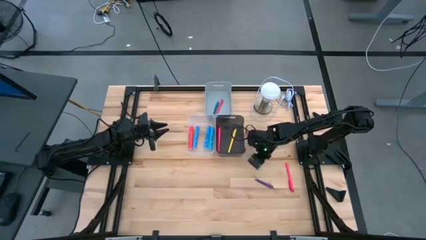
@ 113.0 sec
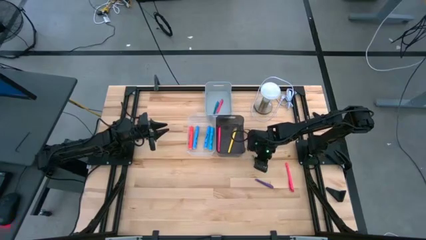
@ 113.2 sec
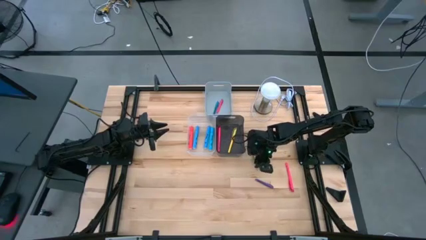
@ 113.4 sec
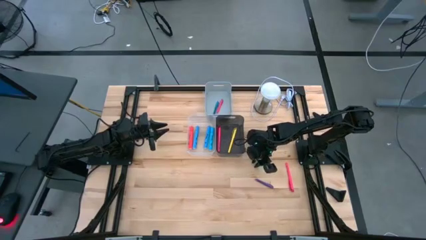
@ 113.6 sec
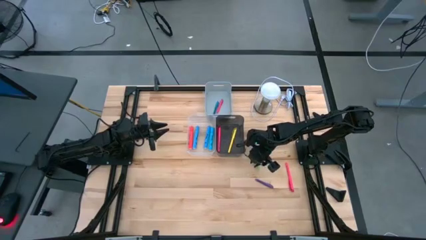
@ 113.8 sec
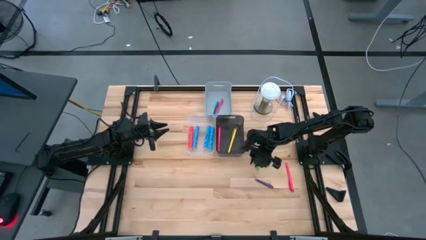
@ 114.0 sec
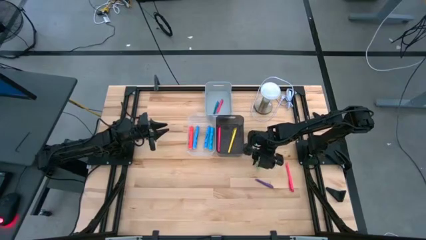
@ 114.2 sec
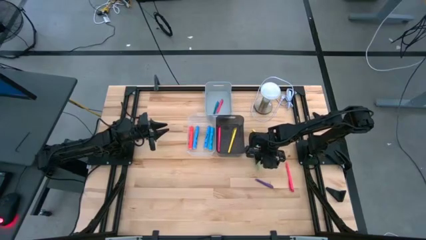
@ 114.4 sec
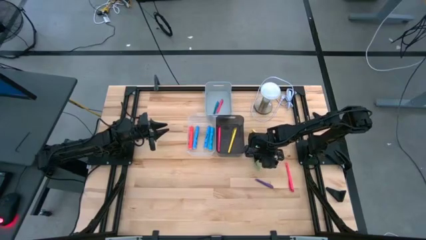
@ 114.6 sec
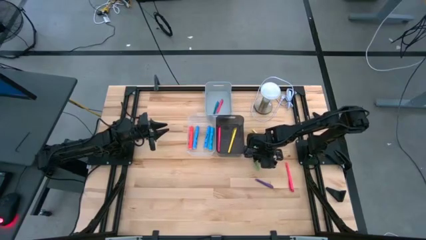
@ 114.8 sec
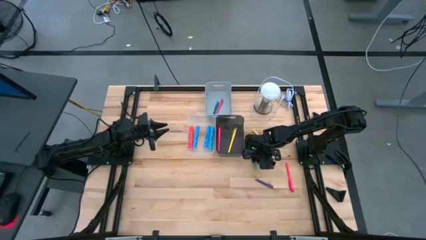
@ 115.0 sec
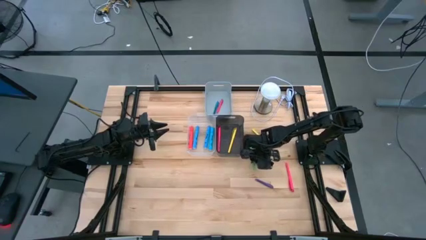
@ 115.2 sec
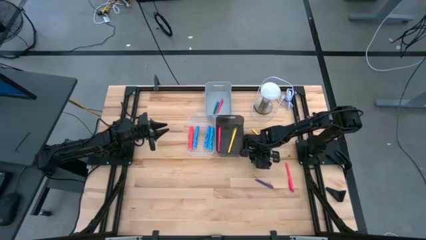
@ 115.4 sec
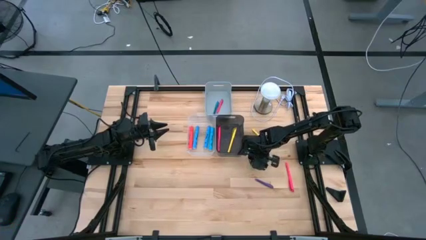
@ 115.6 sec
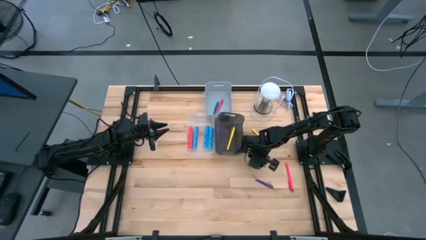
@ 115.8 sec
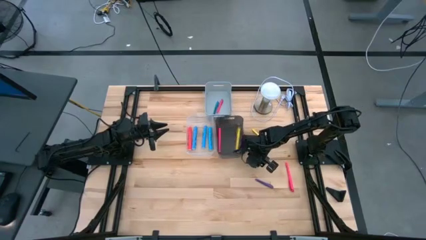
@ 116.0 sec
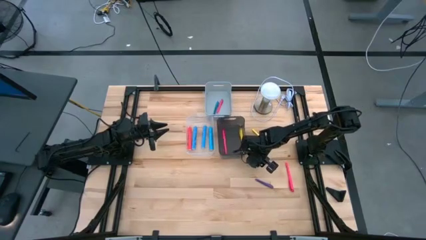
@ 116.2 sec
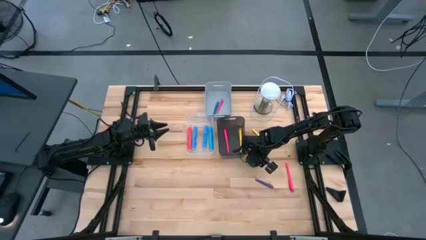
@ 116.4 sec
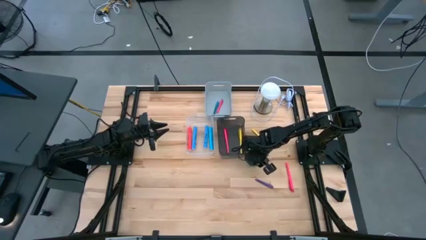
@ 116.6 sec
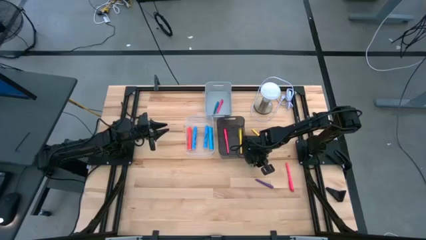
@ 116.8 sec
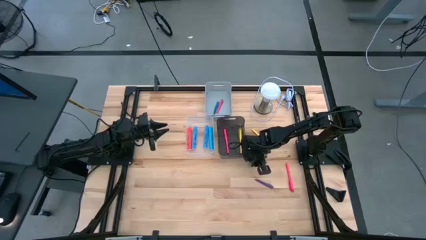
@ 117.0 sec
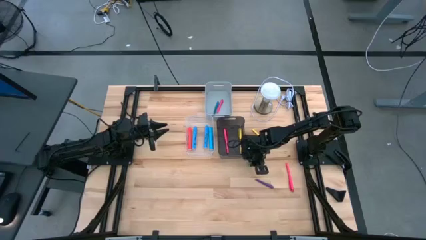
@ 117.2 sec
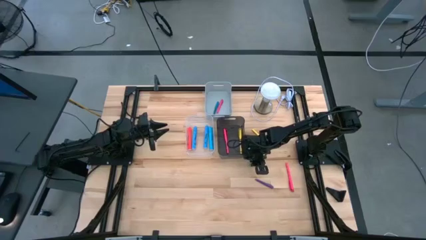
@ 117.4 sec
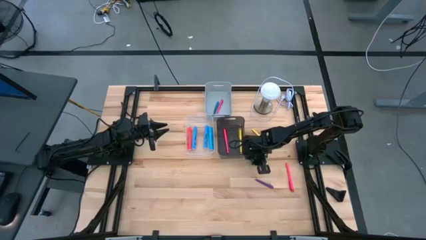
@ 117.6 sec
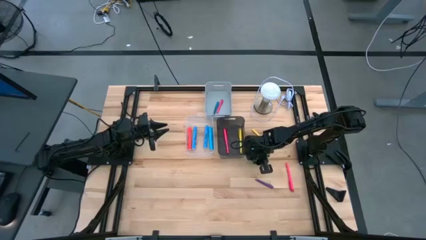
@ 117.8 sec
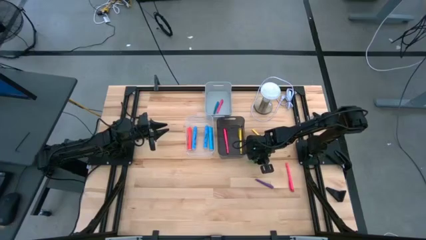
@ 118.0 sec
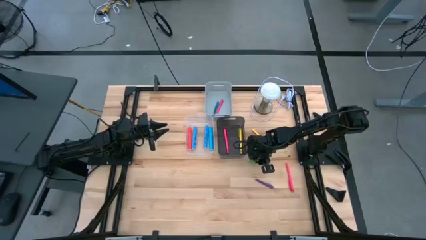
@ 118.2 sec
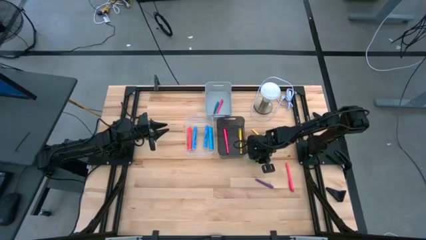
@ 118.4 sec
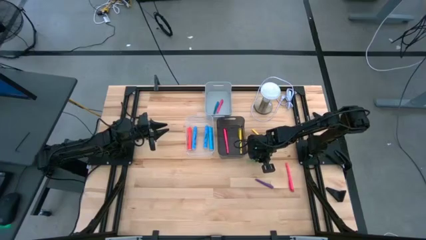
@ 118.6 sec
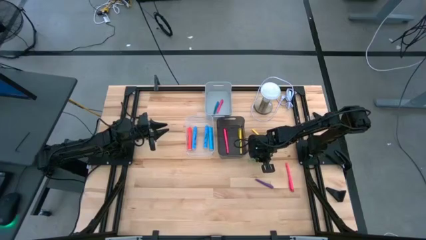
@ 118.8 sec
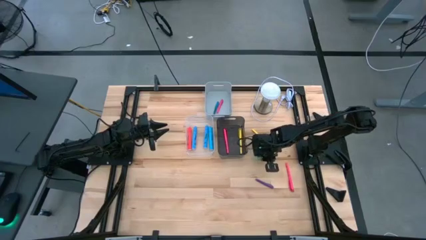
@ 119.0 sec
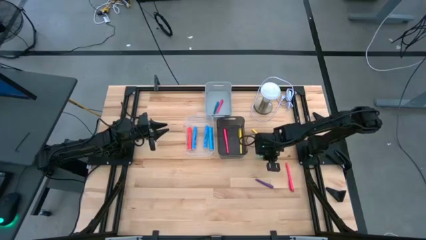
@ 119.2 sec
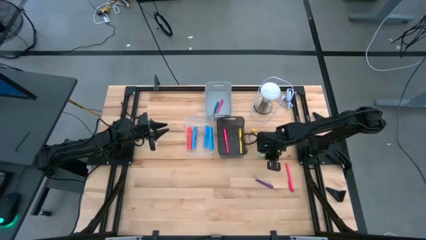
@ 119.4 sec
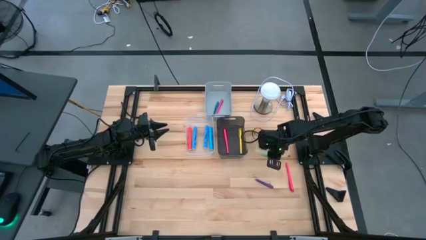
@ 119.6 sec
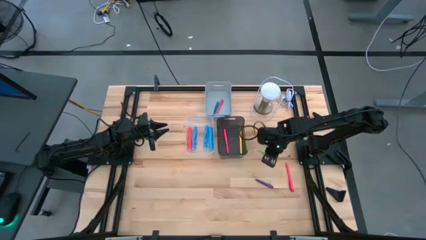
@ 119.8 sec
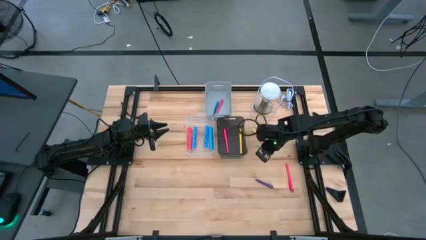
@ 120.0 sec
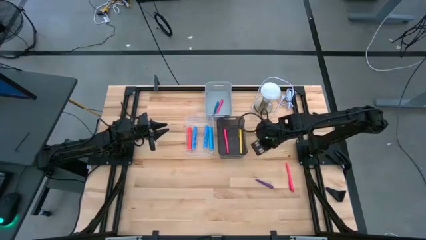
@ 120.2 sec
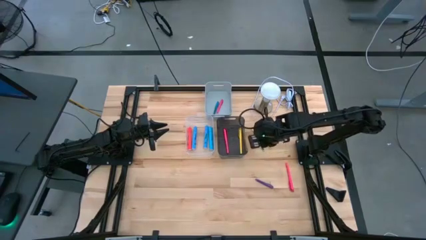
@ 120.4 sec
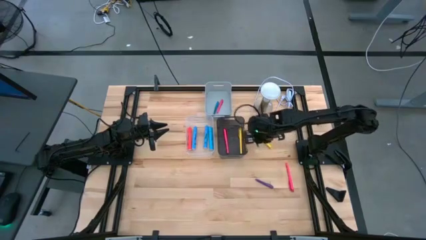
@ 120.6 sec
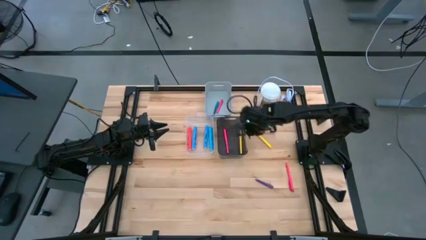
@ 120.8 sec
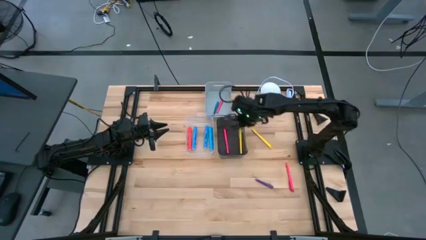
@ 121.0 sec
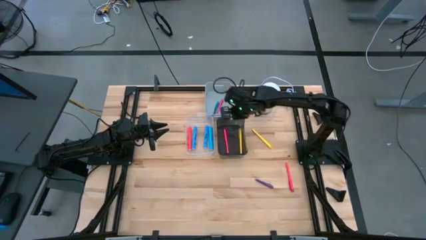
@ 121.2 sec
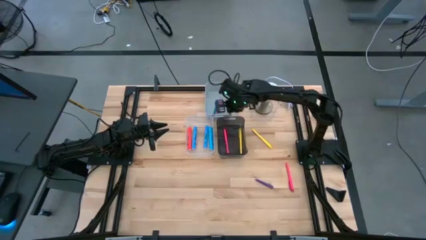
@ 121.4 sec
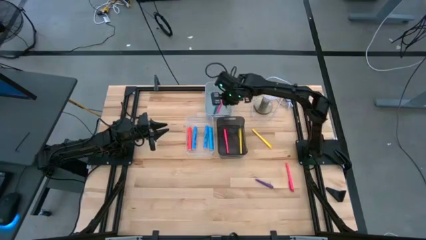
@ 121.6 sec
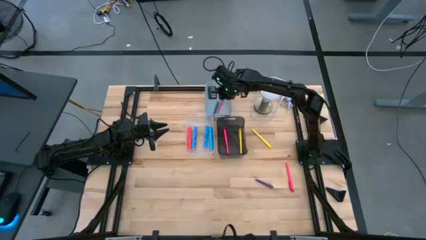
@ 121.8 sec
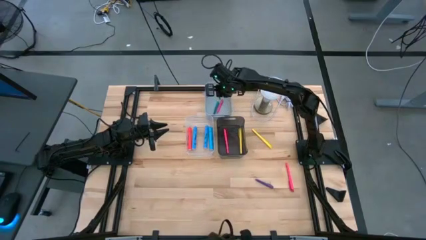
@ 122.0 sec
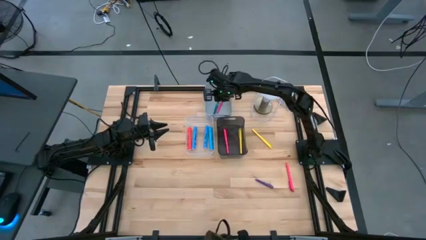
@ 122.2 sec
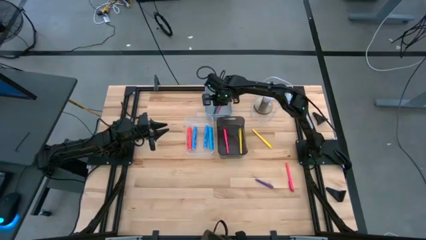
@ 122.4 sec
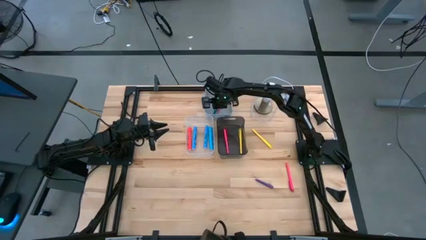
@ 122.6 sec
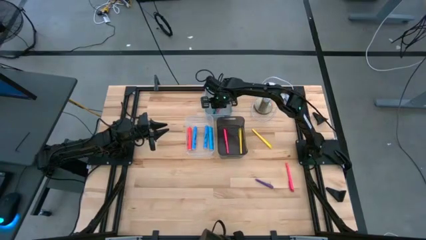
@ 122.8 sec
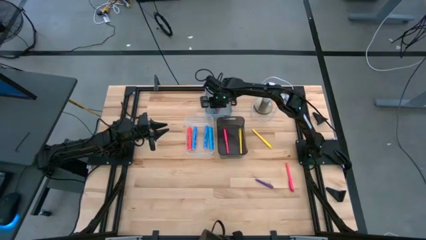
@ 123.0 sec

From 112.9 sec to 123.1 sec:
Task: Pick & Place Markers
Put the green pen into the gray bin
